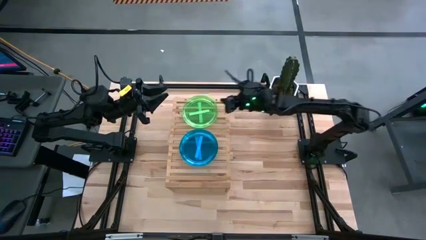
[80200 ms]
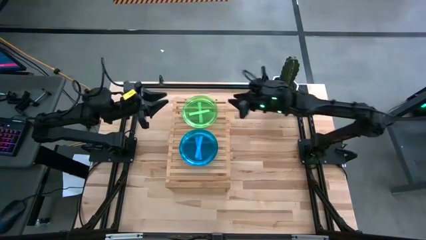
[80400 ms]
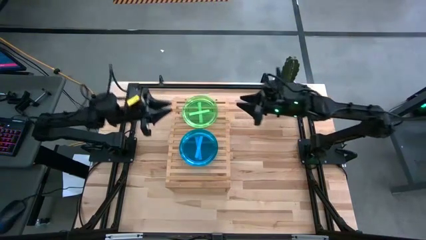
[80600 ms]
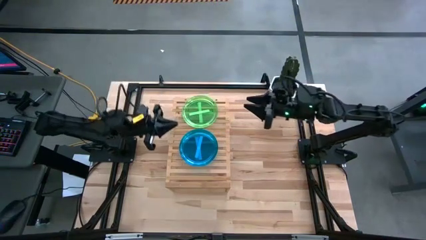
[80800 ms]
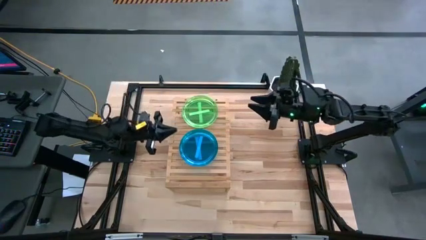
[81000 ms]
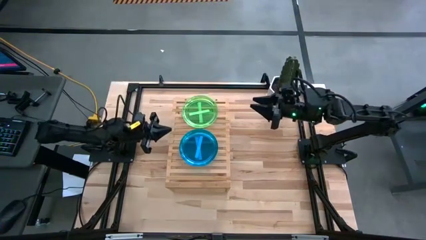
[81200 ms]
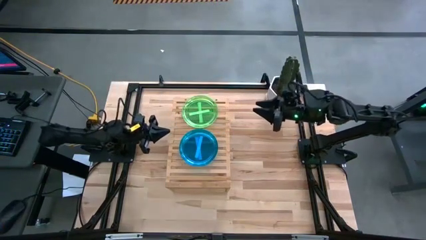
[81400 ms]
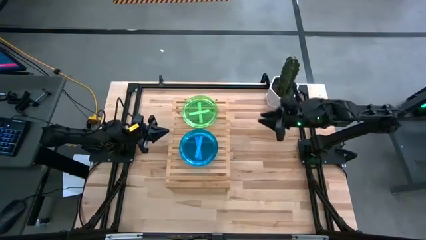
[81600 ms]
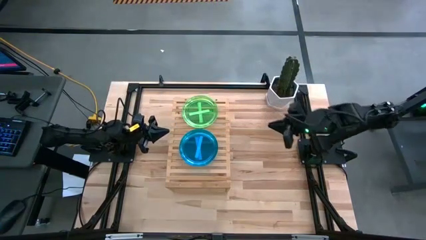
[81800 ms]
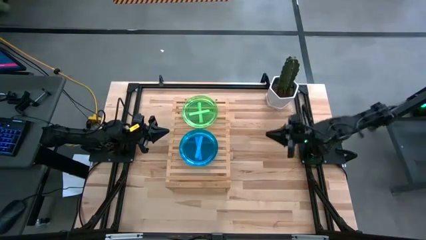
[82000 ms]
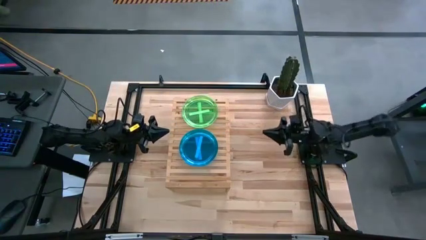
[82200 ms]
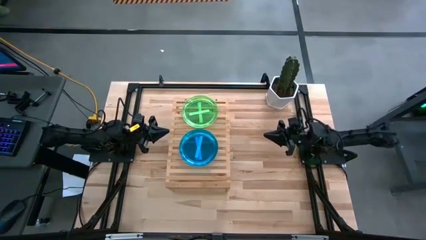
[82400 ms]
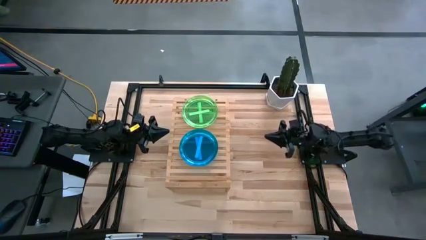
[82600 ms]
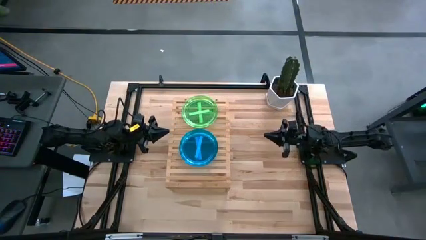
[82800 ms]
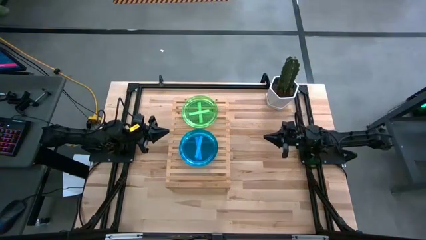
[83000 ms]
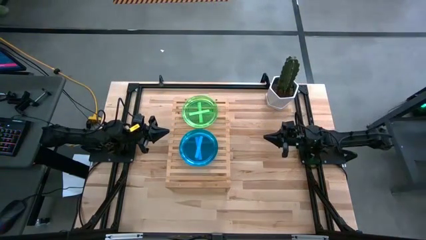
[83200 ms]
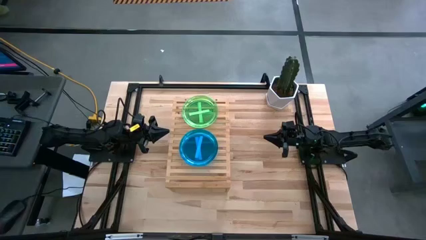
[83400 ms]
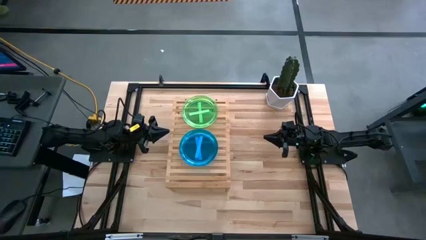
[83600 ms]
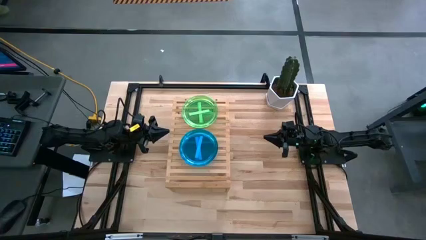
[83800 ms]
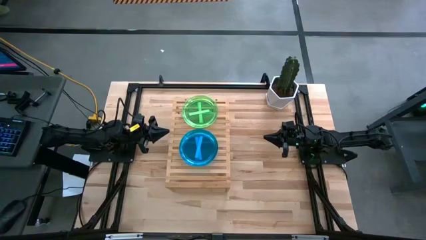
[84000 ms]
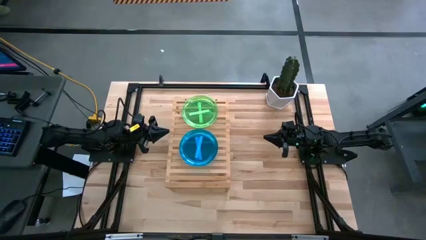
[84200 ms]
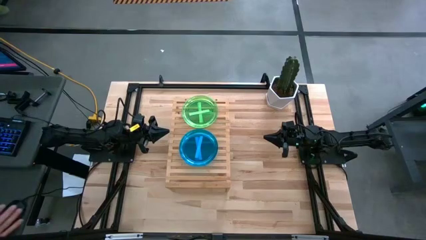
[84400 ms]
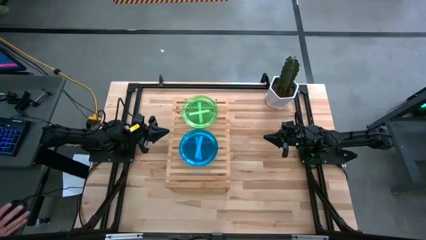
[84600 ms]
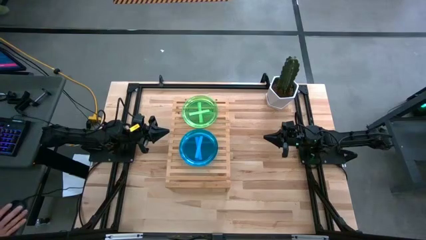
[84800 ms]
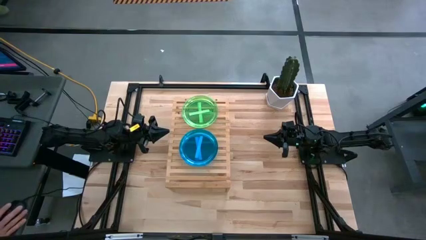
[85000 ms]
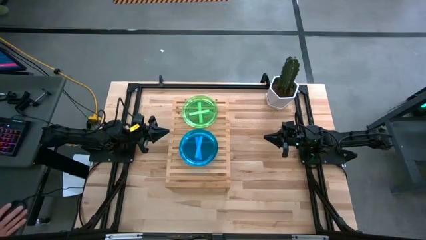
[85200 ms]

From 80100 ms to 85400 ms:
Task: Place and stack plates onto a shelf
Return to Home Position

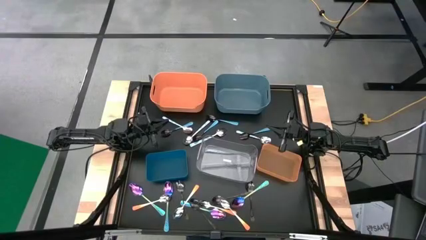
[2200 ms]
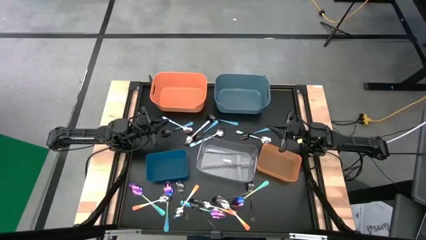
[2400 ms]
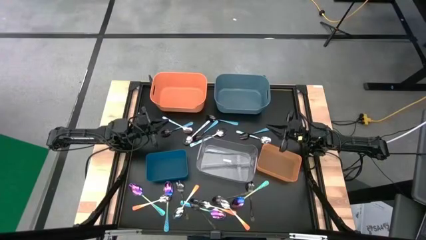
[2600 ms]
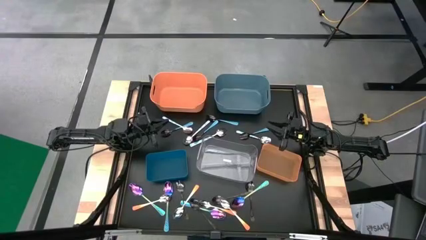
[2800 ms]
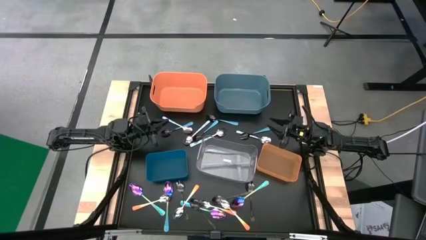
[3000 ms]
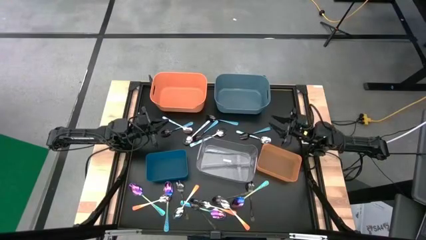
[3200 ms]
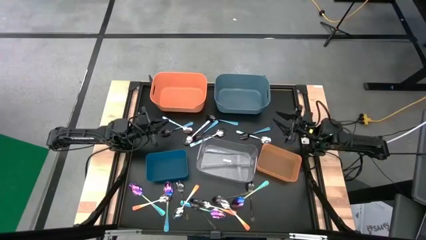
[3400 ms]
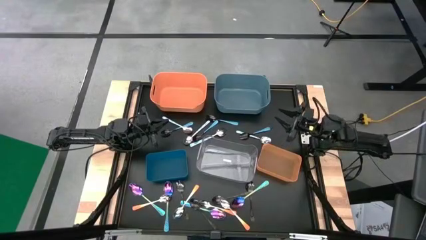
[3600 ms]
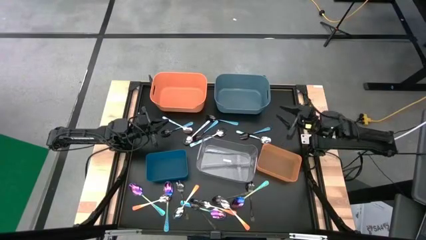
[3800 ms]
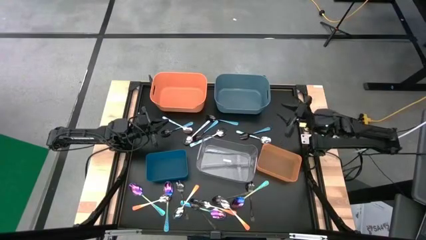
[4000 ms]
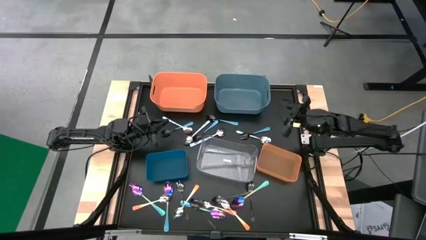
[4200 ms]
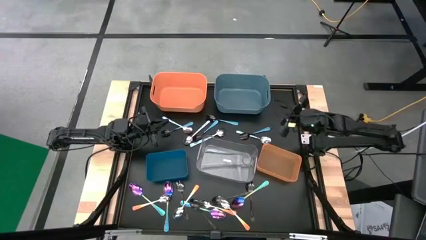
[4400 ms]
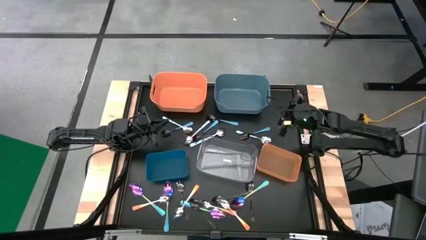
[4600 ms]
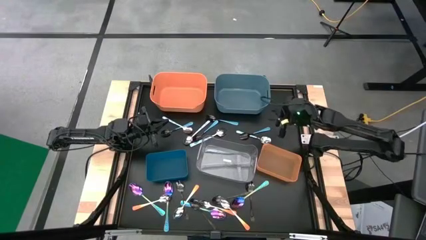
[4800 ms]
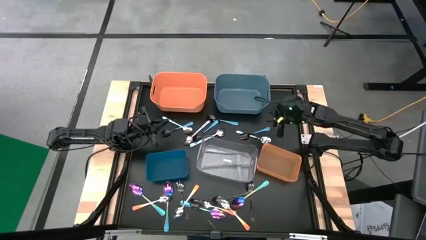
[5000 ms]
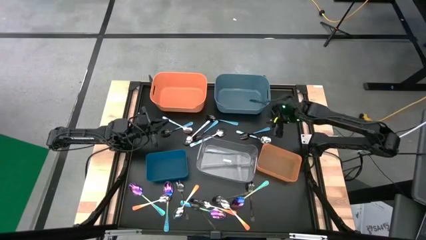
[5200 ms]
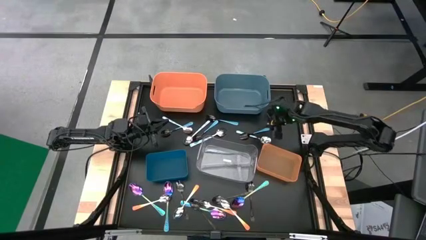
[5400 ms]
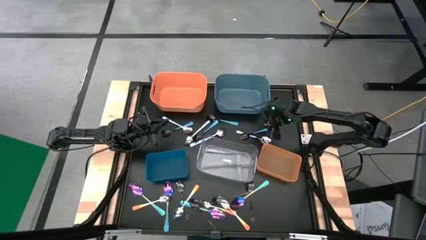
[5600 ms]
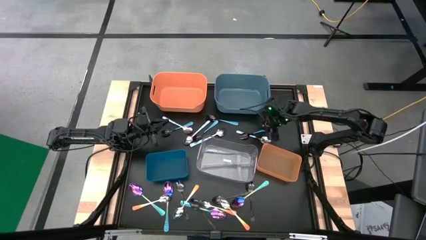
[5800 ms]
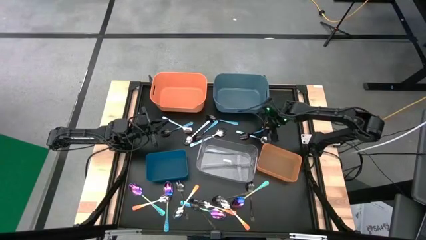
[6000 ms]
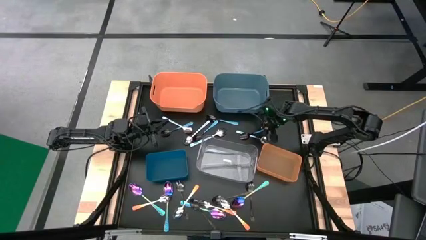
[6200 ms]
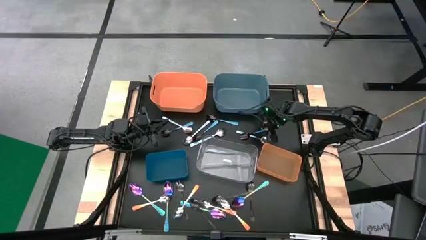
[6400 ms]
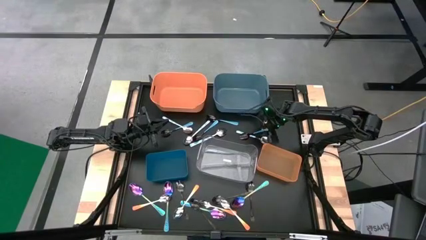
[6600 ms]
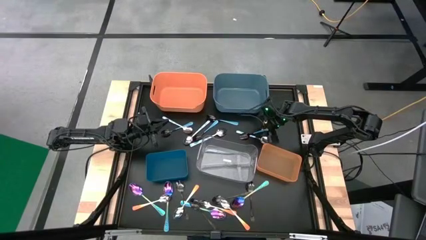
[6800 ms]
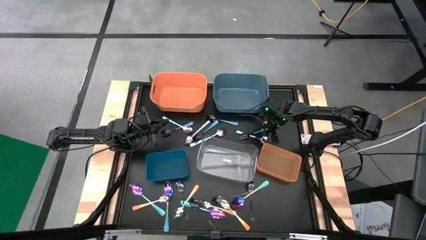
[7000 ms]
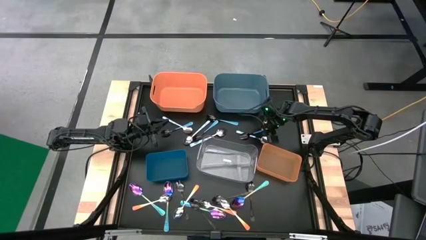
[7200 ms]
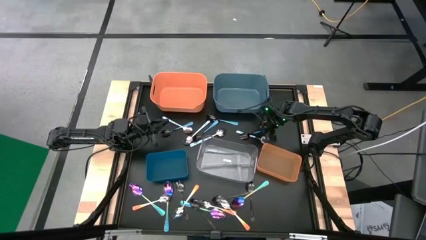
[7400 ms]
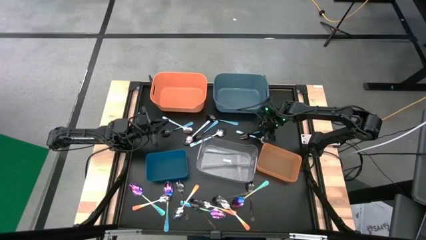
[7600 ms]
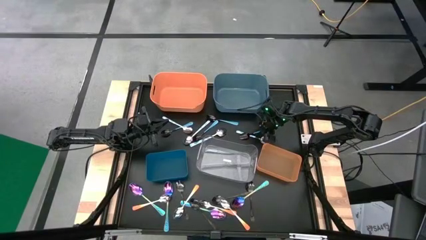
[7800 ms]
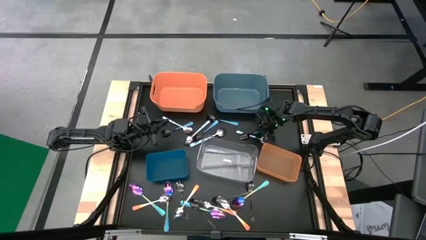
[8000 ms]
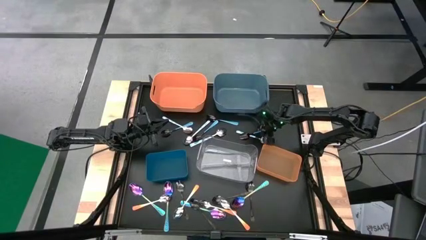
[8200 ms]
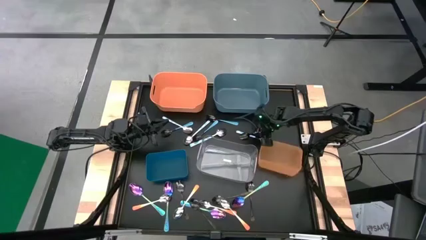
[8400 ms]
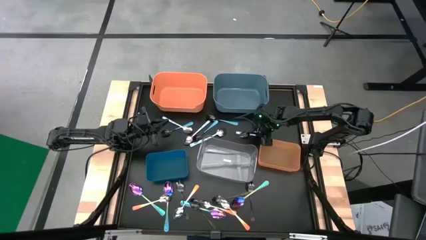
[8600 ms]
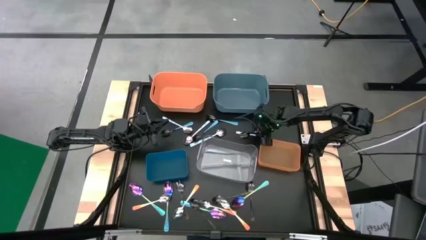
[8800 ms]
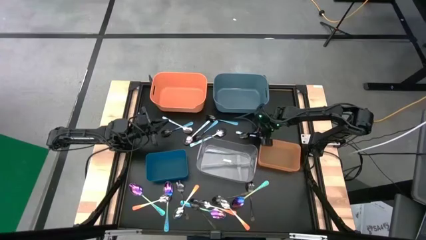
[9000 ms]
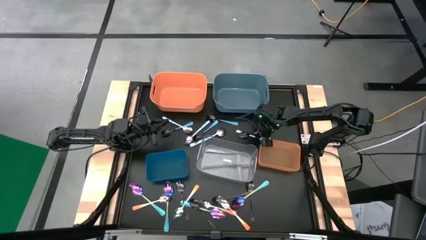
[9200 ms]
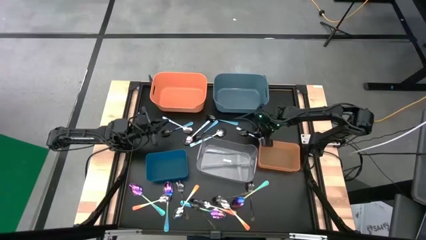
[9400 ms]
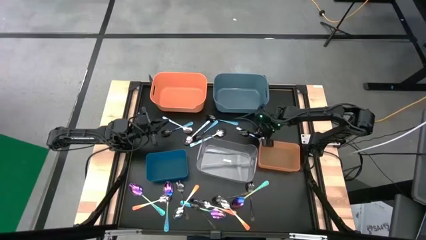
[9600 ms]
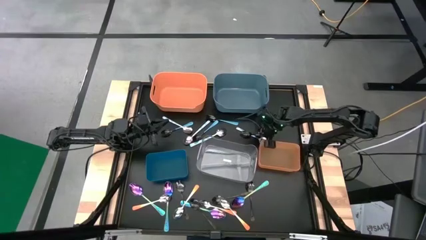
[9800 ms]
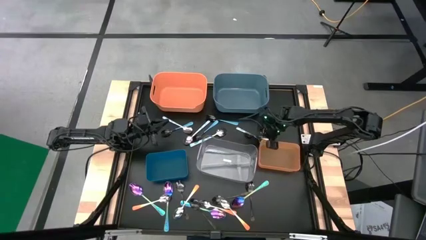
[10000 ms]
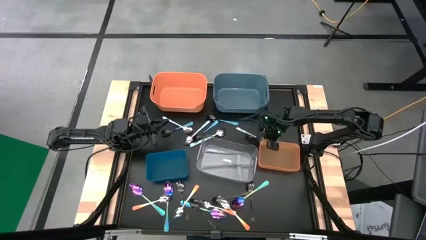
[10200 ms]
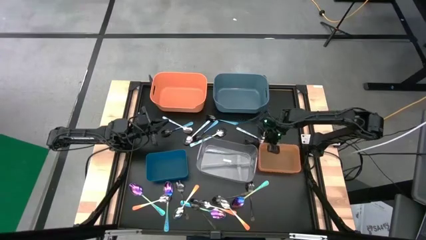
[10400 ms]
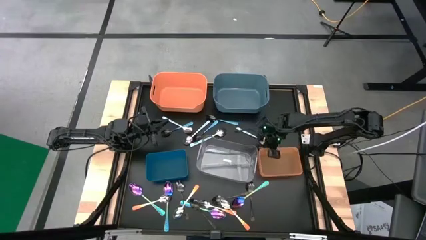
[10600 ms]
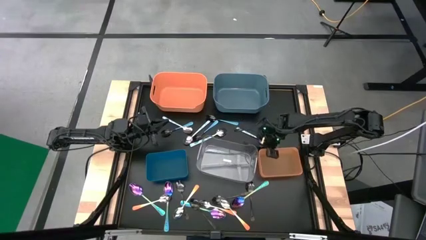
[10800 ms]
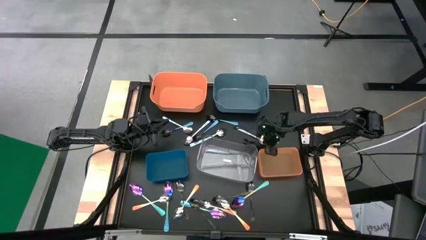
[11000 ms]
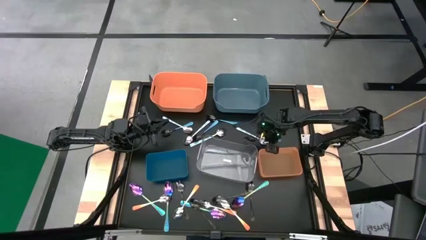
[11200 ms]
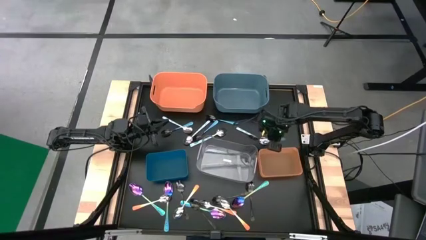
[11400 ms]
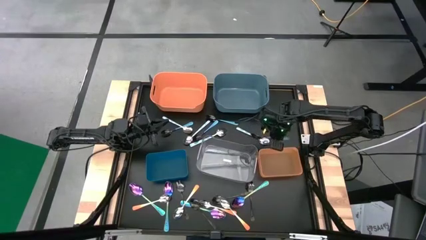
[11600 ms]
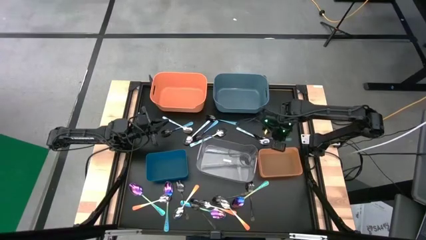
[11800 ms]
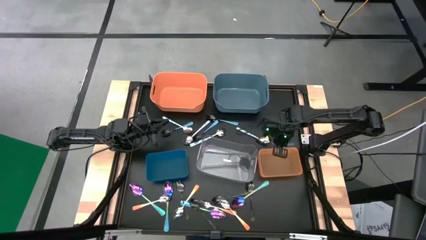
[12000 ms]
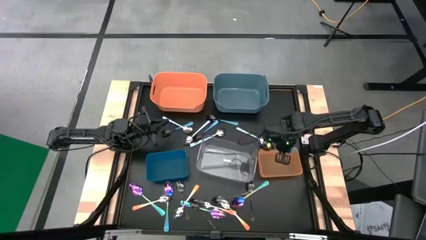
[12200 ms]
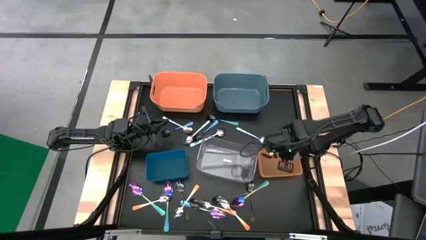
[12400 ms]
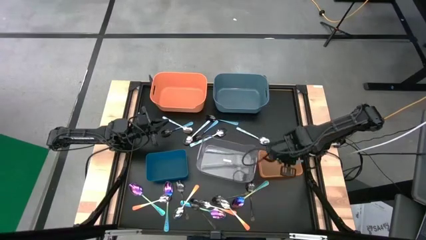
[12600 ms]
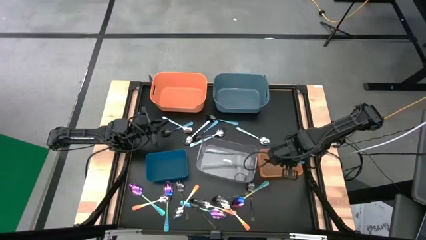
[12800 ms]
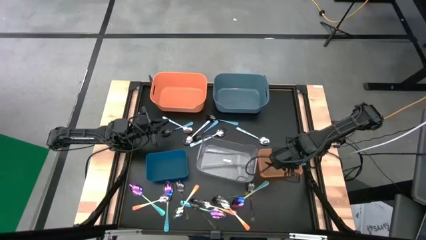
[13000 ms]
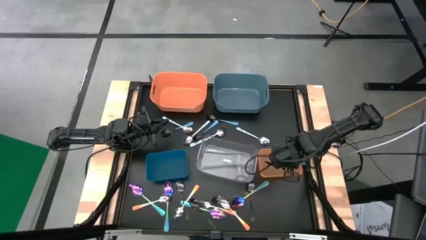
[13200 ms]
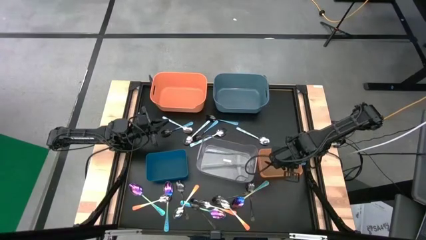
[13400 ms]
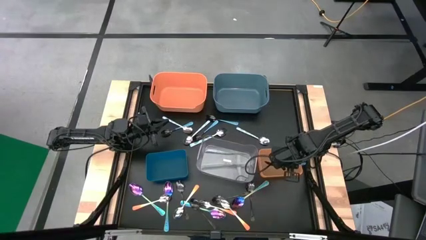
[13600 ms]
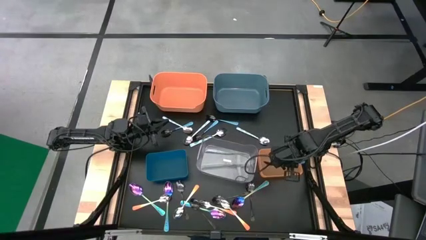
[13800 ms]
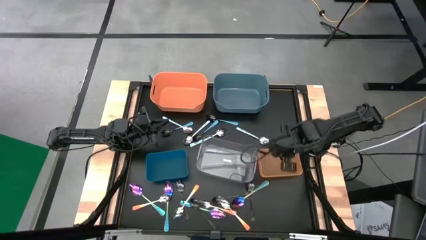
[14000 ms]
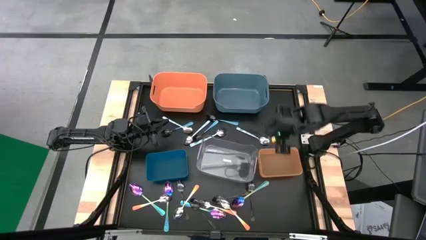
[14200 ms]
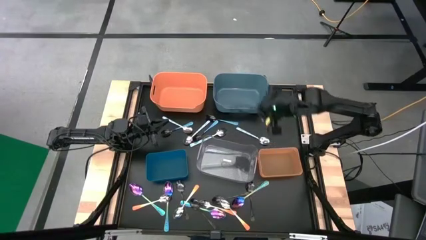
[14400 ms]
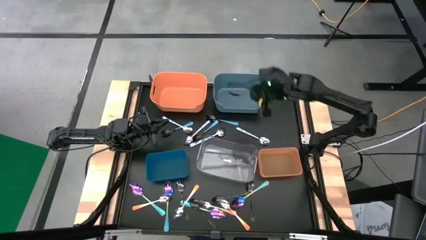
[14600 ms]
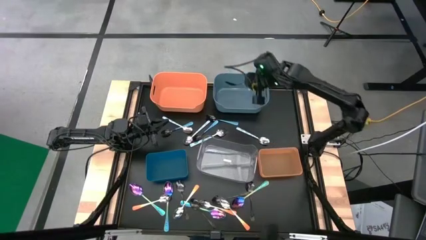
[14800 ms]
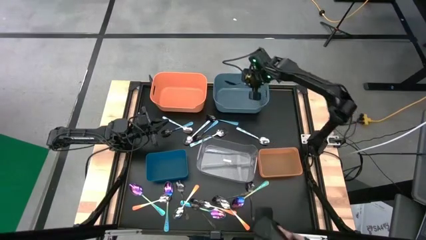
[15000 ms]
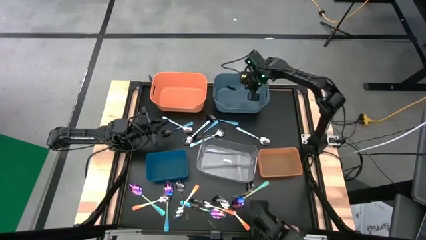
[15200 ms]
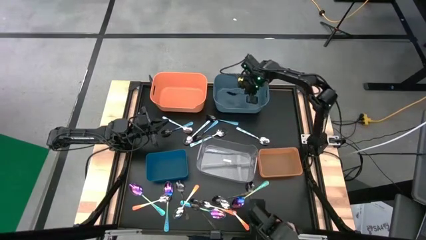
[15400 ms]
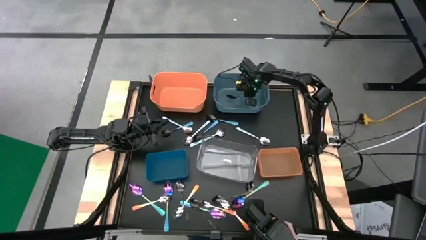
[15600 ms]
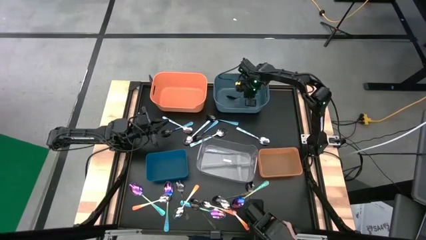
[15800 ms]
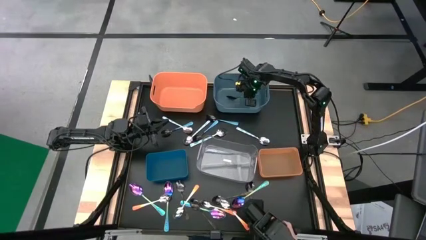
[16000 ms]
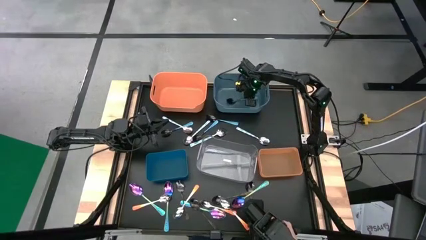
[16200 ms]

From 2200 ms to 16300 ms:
Task: Sort silverware by color (type)
Put the blue spoon into the light blue bin
